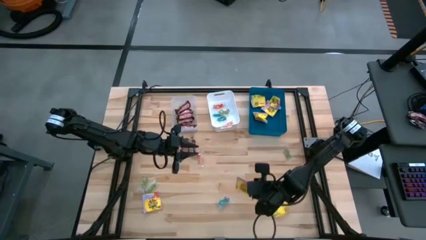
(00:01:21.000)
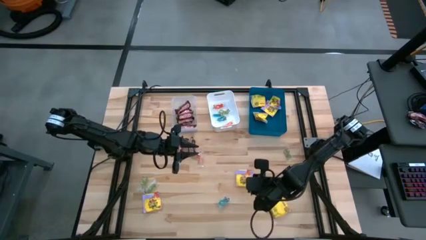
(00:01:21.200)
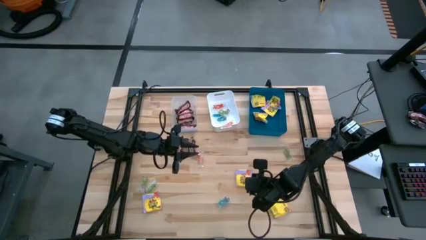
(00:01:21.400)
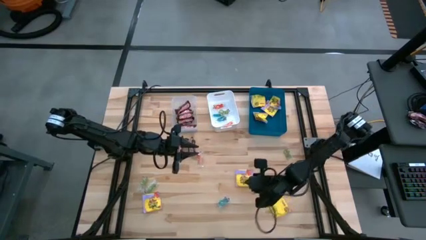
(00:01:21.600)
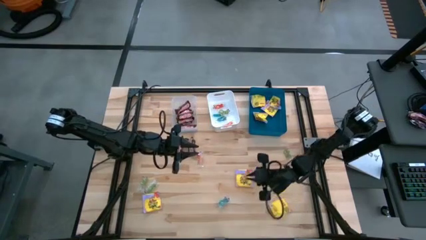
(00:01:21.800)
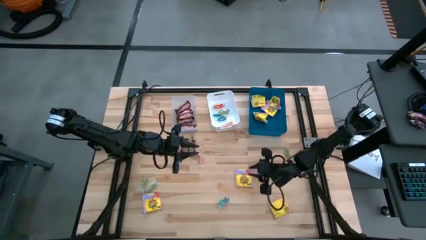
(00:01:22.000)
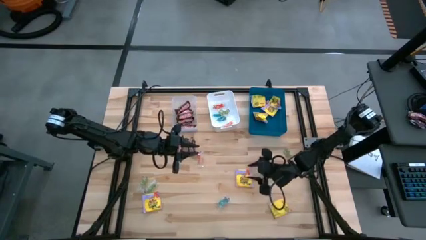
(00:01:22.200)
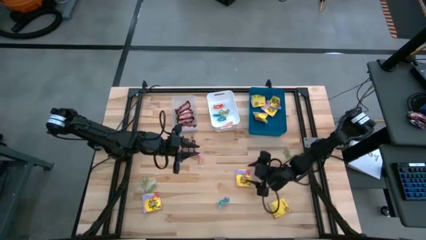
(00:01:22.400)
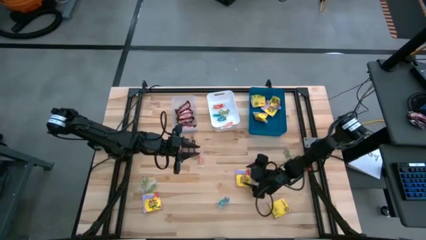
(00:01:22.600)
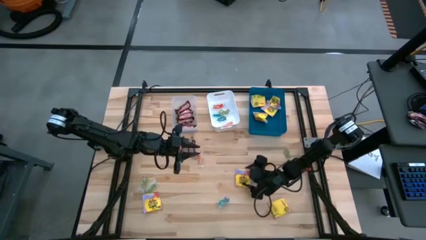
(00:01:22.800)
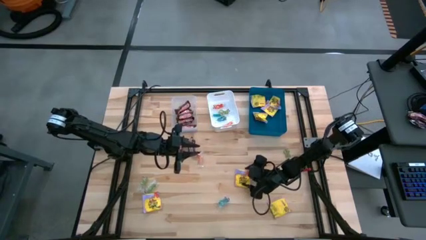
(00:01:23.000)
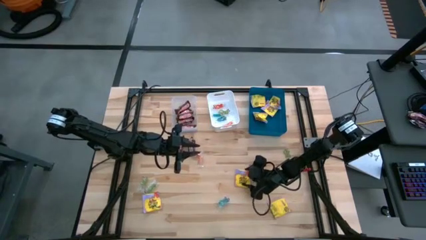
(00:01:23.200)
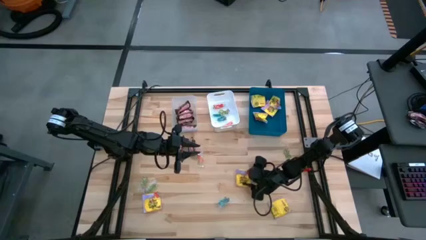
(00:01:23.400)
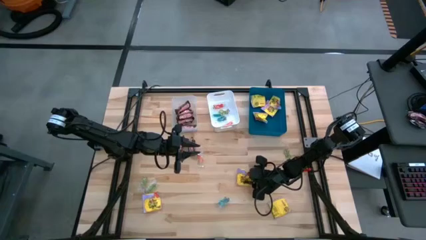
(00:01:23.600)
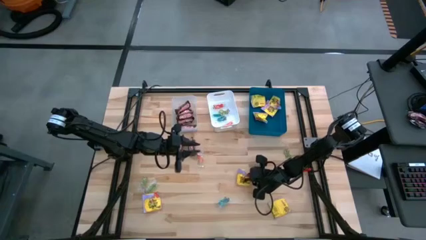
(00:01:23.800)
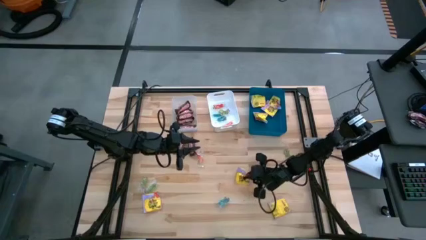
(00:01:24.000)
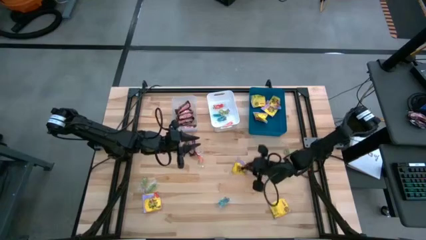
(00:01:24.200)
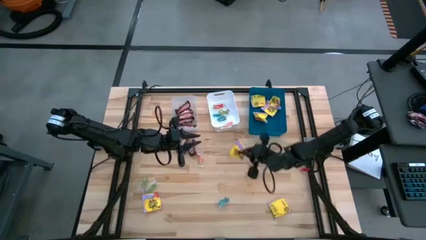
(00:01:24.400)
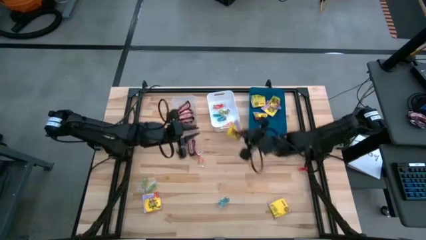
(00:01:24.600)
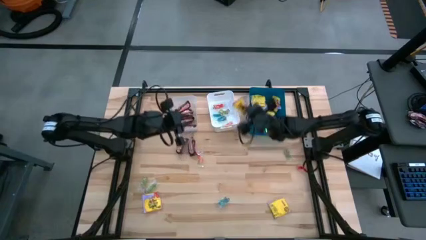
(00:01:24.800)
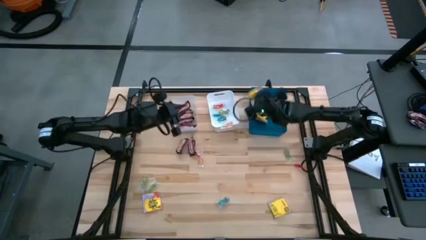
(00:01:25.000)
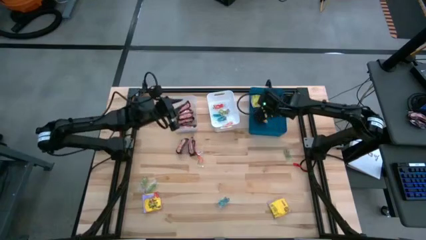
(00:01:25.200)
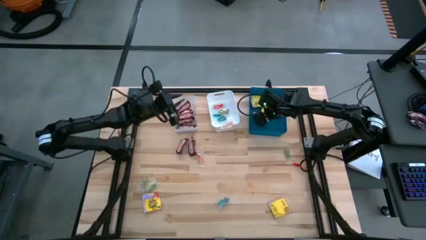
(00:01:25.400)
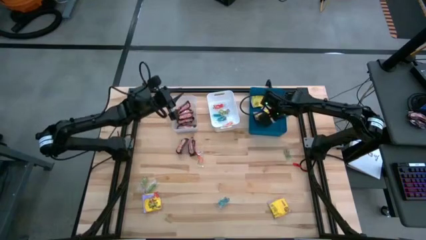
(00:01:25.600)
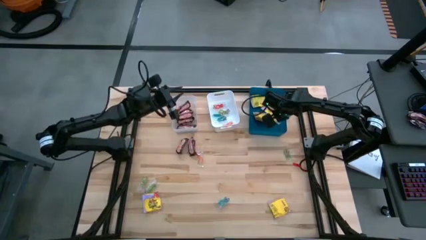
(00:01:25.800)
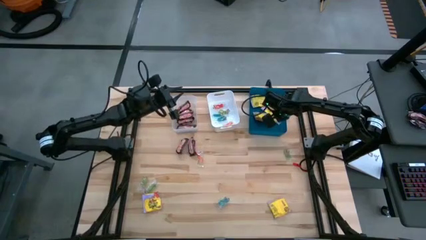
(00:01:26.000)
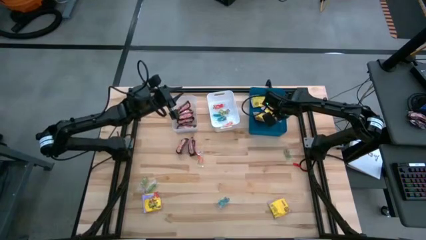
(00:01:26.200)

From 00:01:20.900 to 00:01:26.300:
Task: Sort candy
Put the bottom right yellow sour patch candy into the blue bin

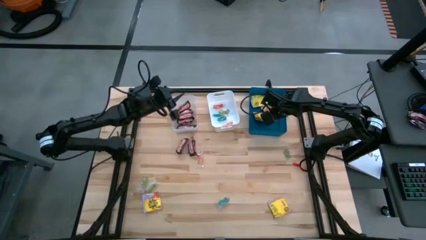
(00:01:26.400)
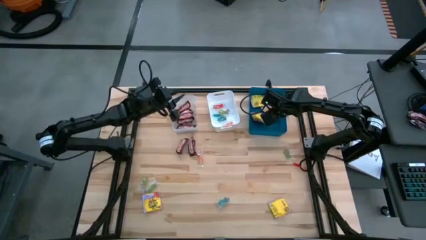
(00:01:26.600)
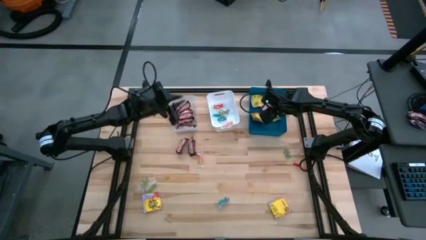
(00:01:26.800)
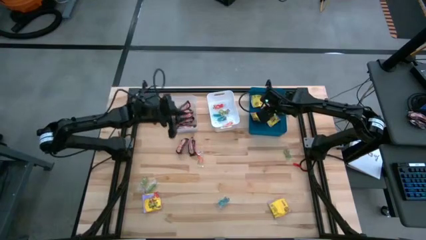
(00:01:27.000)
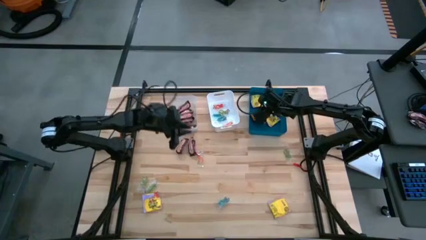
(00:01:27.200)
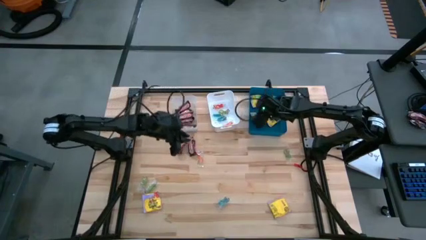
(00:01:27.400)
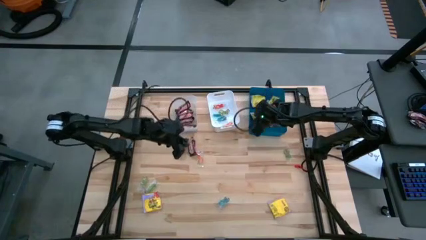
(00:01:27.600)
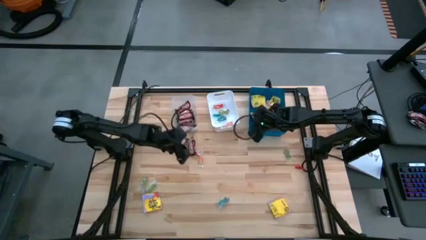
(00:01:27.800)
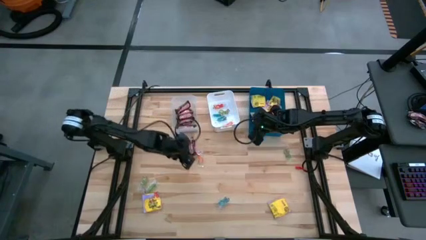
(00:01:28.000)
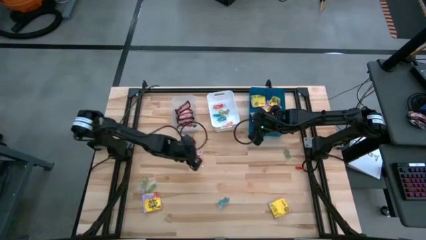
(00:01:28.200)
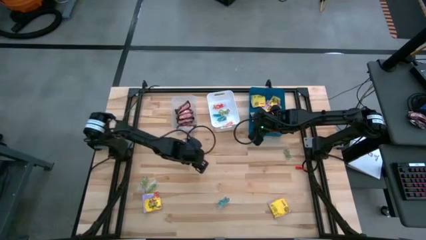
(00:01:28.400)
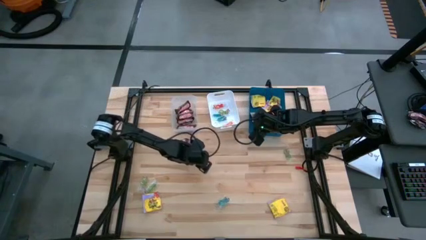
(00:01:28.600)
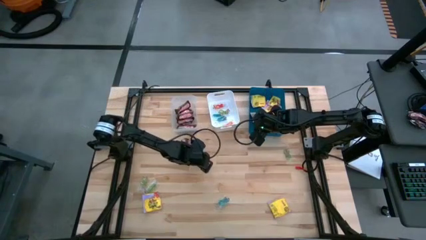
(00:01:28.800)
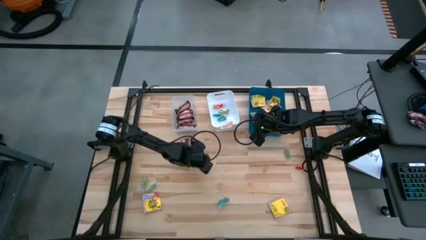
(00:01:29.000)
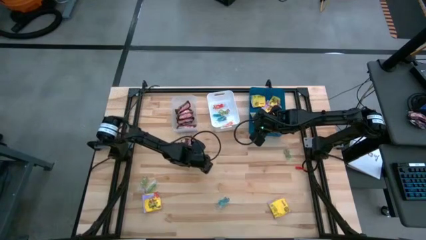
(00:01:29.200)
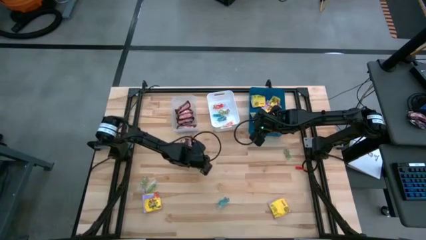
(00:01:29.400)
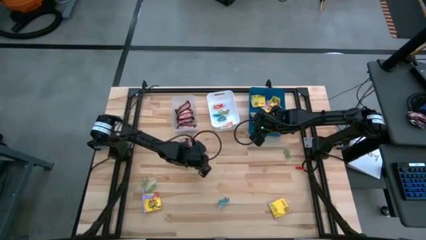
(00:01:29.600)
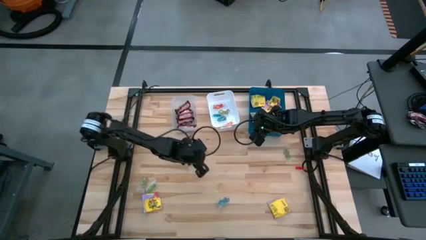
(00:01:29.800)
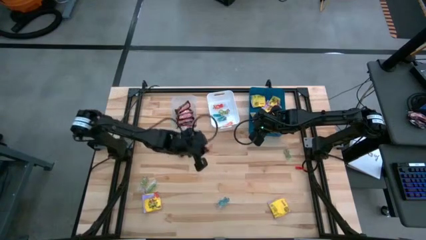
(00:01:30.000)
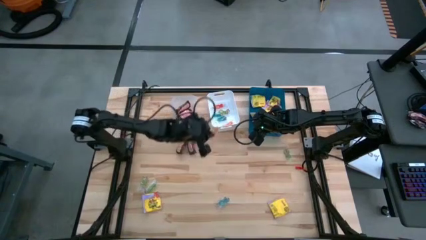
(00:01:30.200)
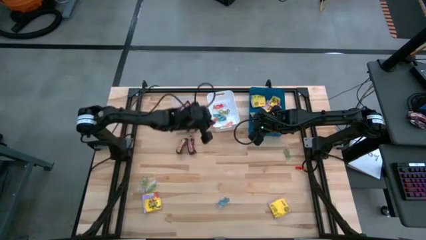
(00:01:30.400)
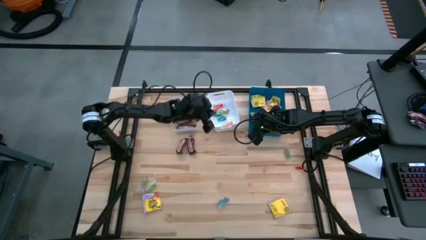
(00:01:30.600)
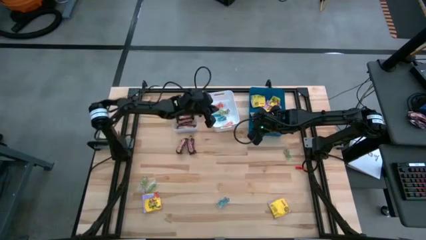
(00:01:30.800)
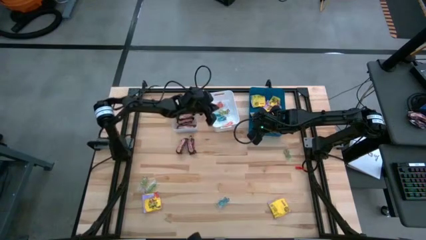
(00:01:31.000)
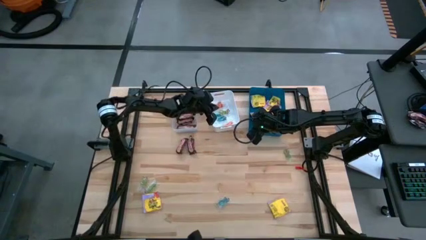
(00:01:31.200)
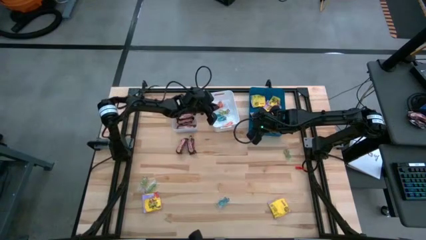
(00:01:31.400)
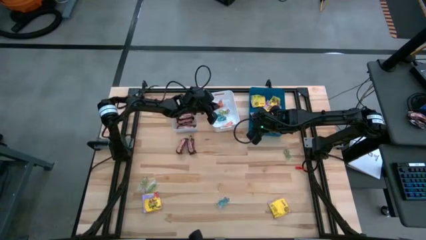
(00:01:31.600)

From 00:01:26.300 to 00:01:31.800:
Put the orange jelly candy into the white bin

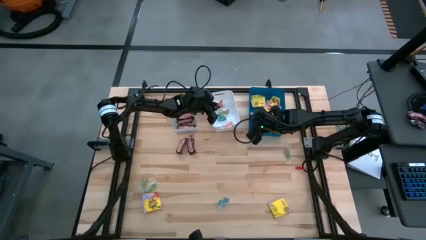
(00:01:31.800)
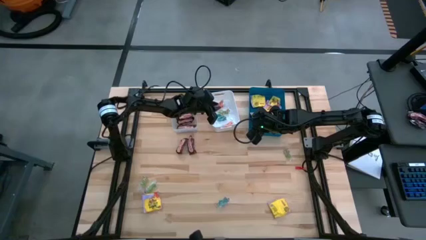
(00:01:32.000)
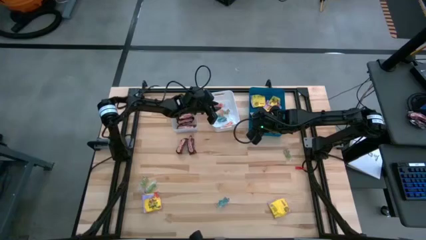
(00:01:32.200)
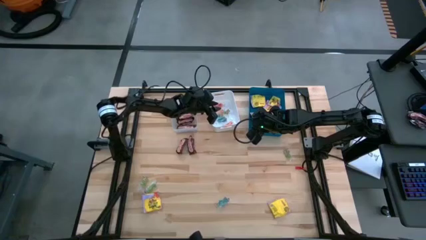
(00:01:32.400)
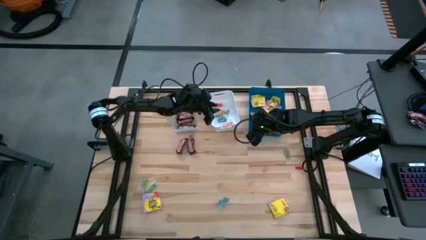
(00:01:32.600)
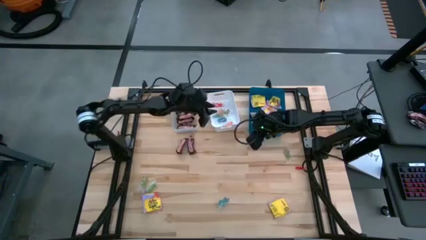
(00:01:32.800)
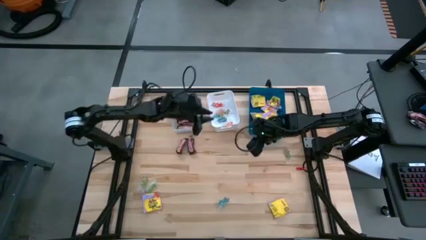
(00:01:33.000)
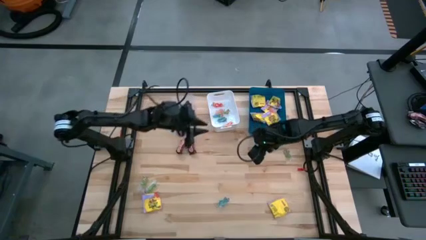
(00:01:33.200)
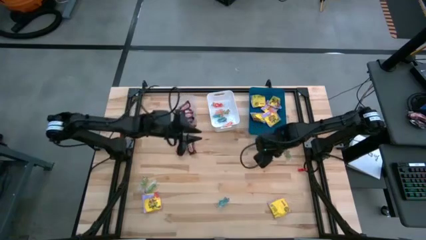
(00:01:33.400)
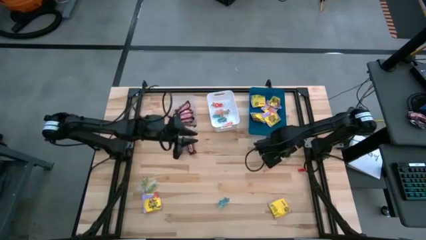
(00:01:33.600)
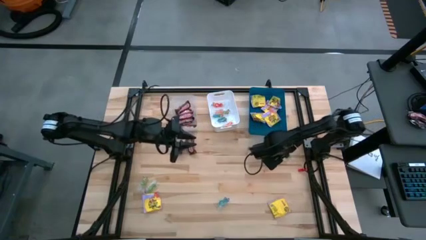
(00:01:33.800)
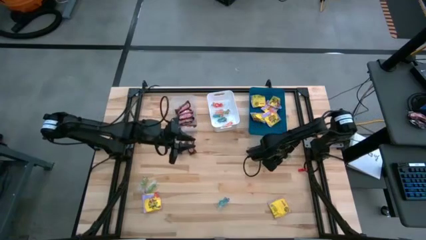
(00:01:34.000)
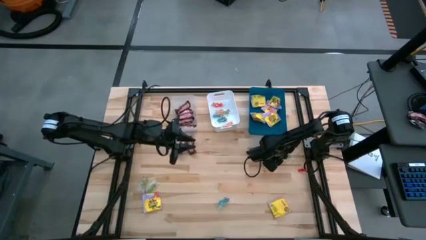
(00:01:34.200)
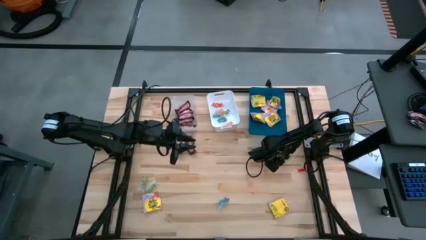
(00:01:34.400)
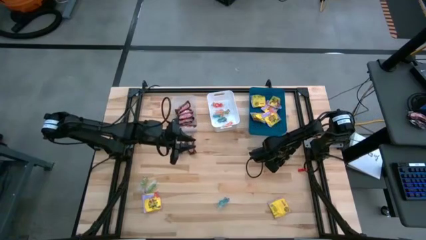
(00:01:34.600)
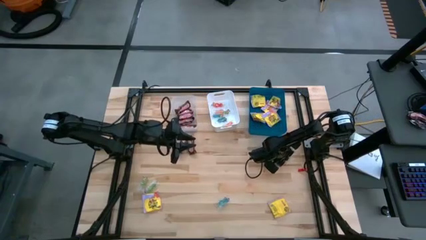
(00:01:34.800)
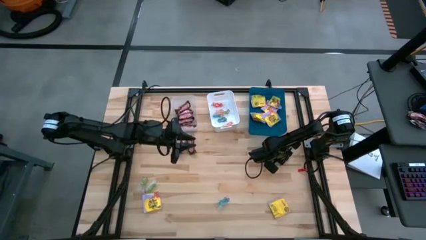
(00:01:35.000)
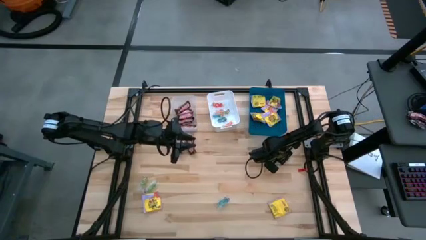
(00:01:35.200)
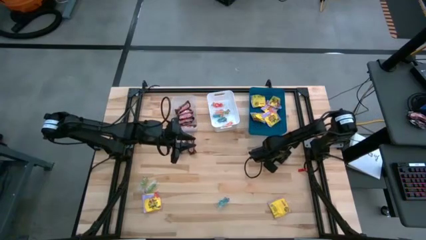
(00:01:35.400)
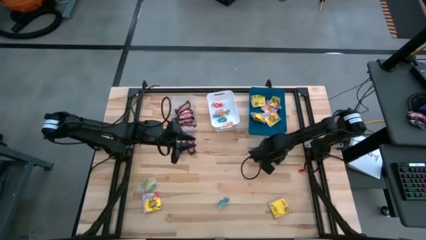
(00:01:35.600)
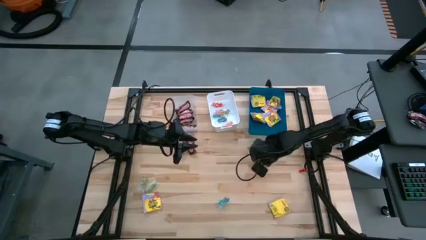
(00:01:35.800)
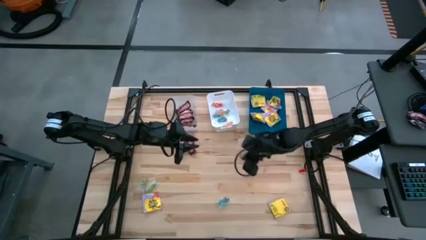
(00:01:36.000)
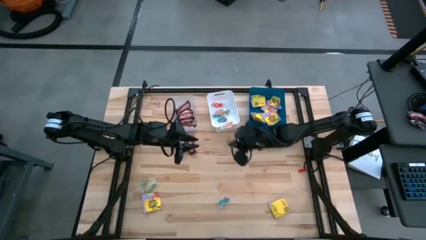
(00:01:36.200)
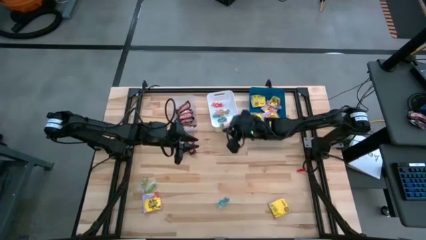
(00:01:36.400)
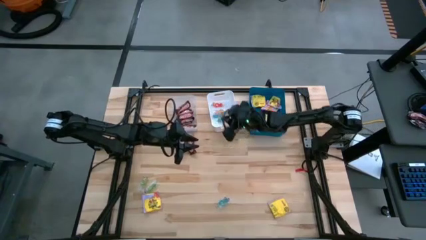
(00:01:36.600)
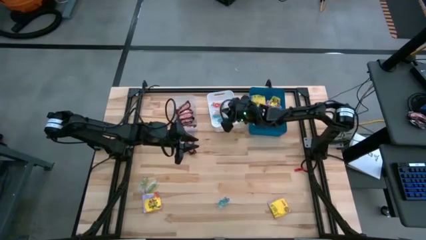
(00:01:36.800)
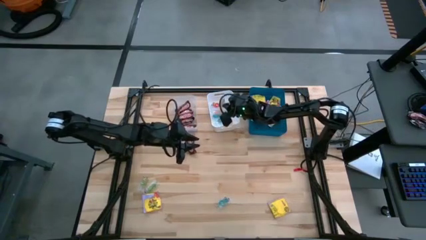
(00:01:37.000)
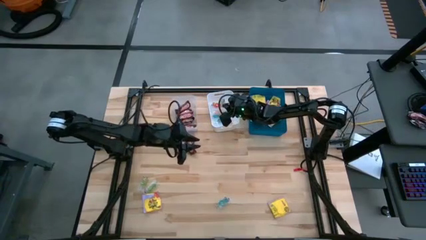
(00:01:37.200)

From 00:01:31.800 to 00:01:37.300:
Put the middle right green jelly candy into the white bin
